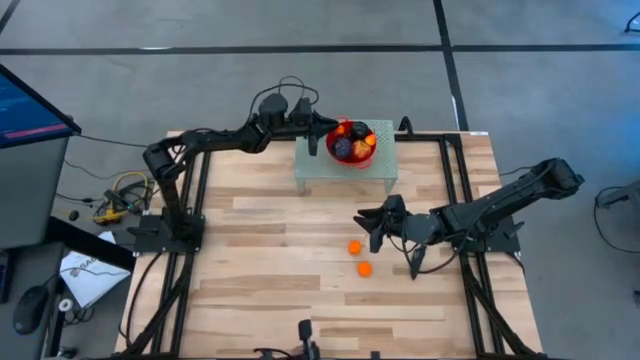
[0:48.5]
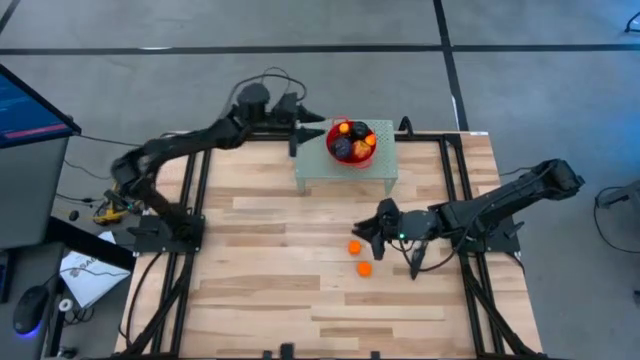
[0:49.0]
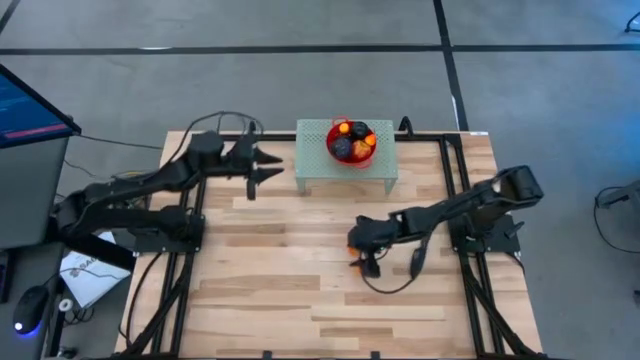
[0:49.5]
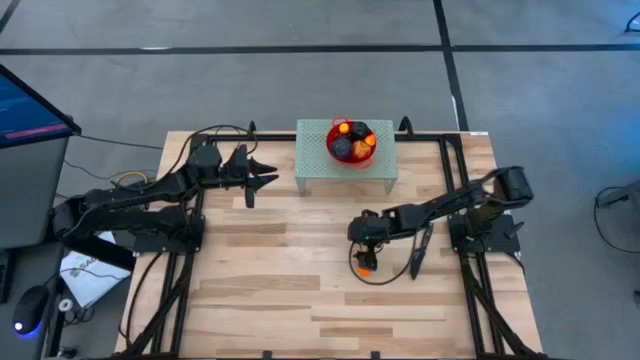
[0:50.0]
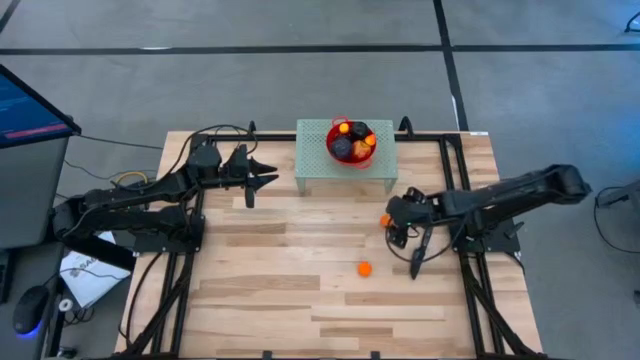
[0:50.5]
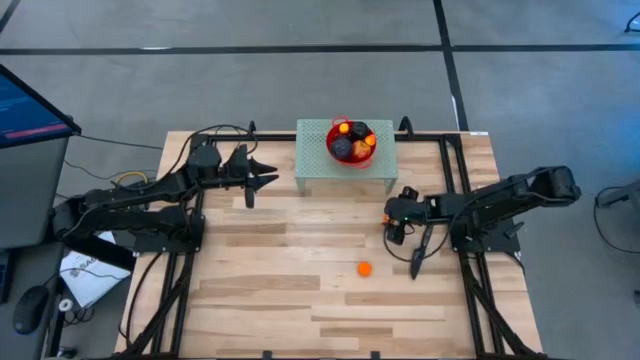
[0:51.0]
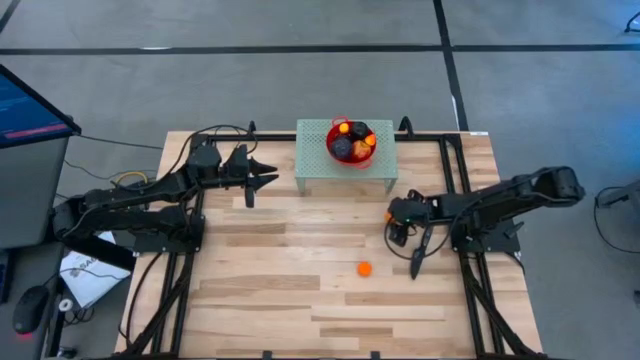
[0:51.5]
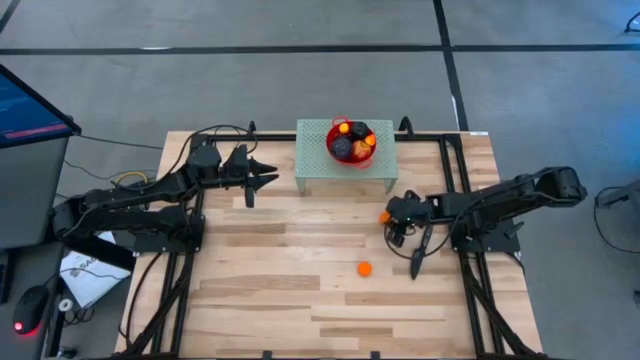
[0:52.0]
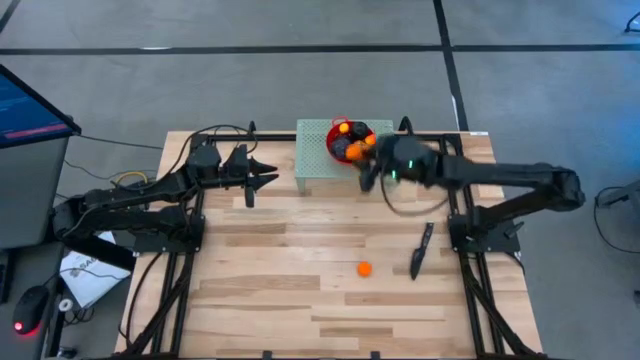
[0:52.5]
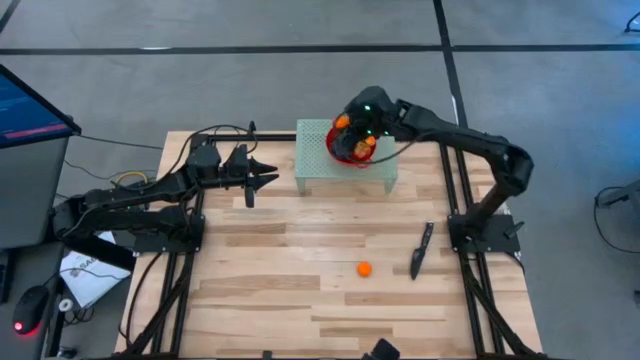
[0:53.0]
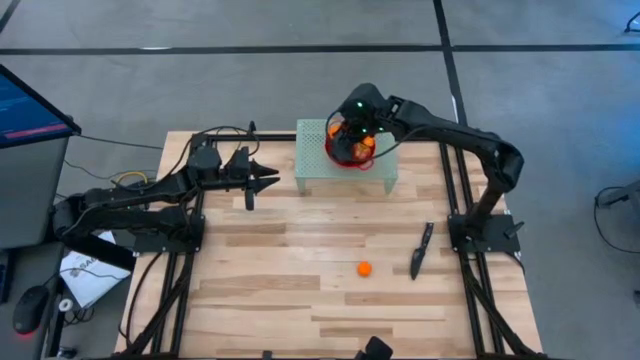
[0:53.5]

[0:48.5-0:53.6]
Task: Pick & Place Fruit
Put the top orange into the red strainer bowl on the shelf

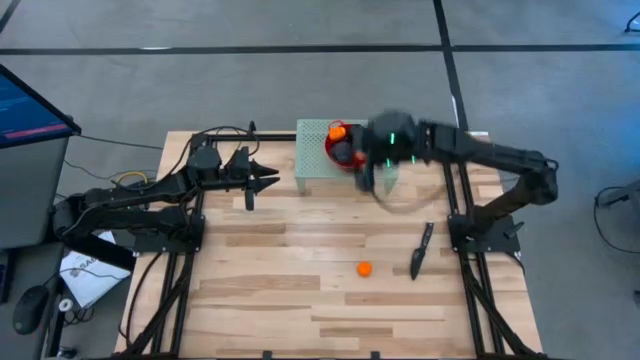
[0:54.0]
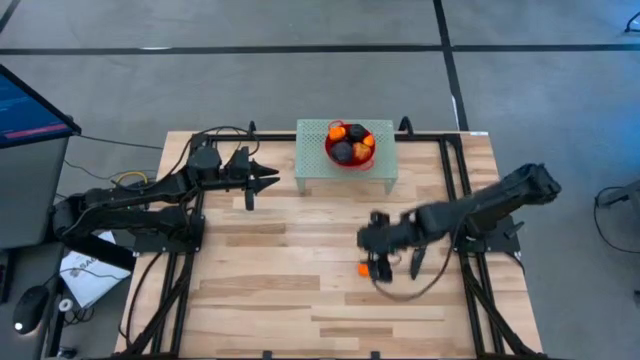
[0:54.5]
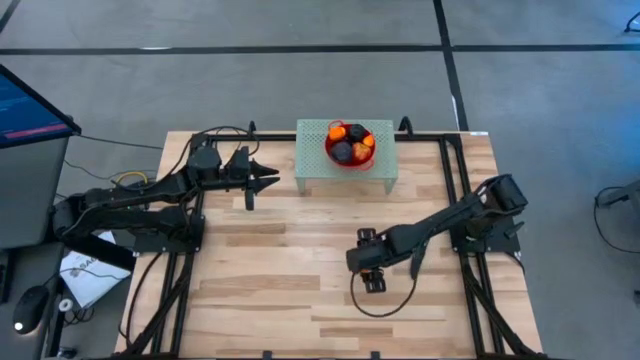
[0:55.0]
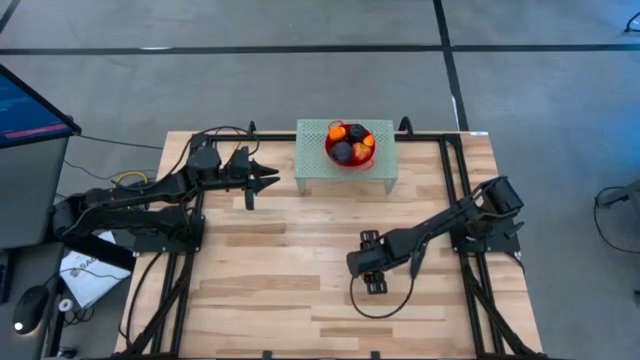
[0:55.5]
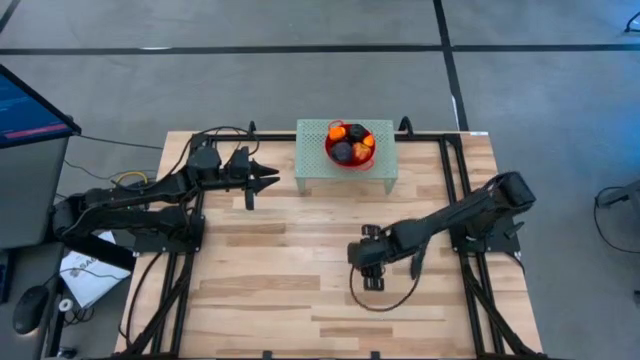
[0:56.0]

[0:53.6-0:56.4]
Put the orange into the red strainer bowl on the shelf

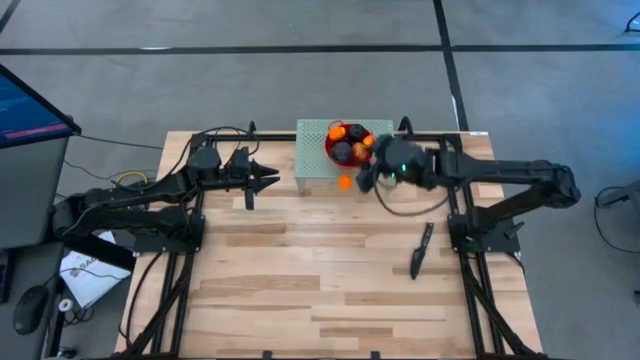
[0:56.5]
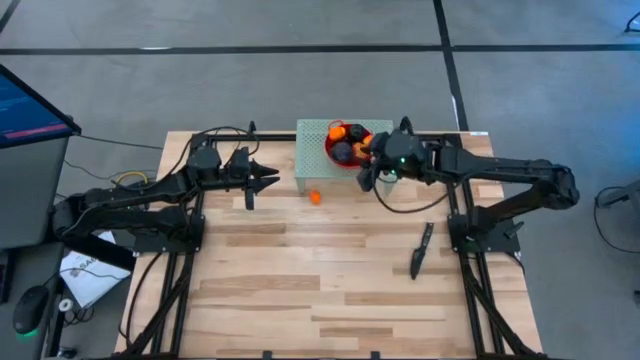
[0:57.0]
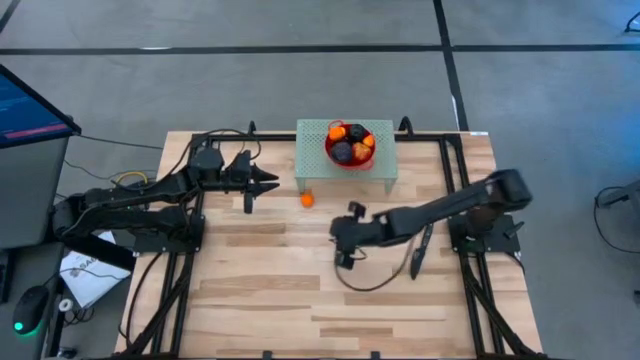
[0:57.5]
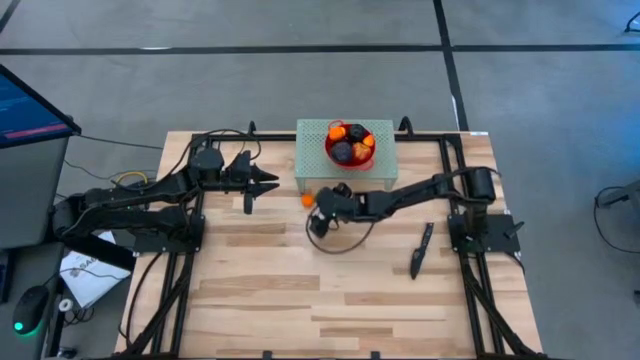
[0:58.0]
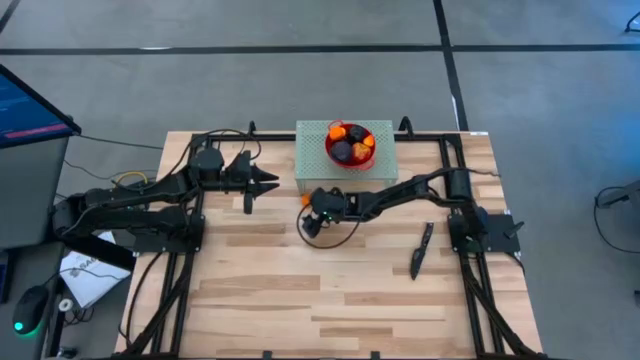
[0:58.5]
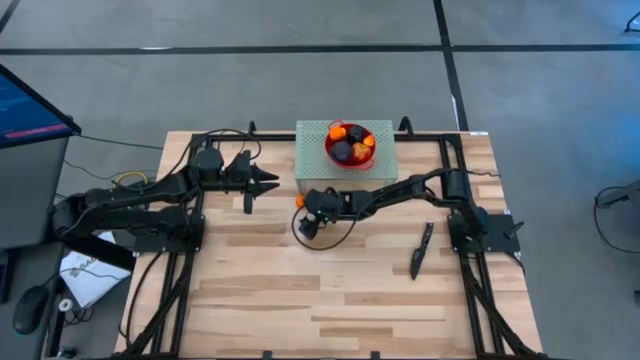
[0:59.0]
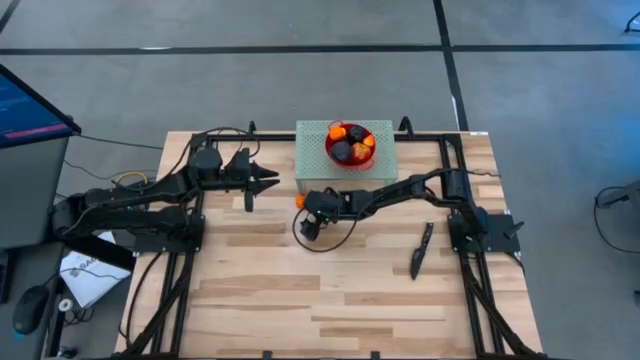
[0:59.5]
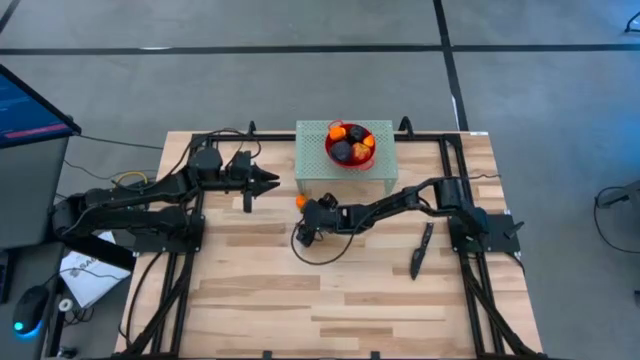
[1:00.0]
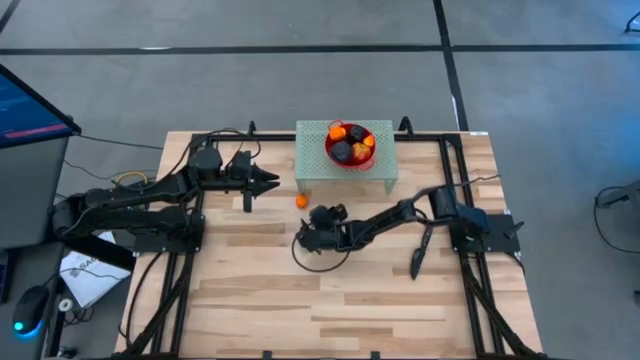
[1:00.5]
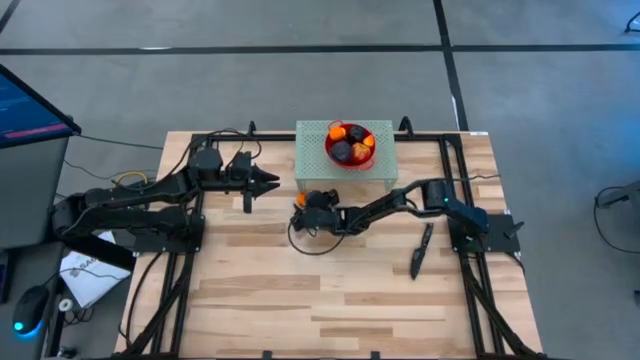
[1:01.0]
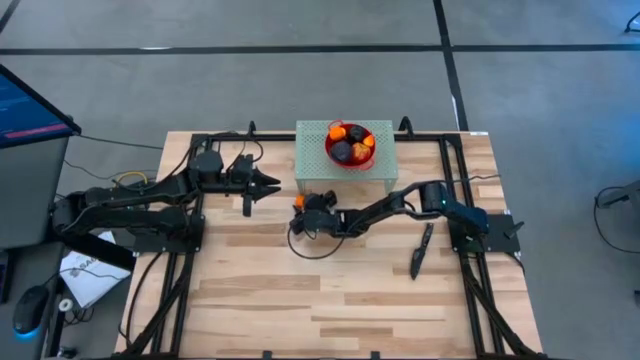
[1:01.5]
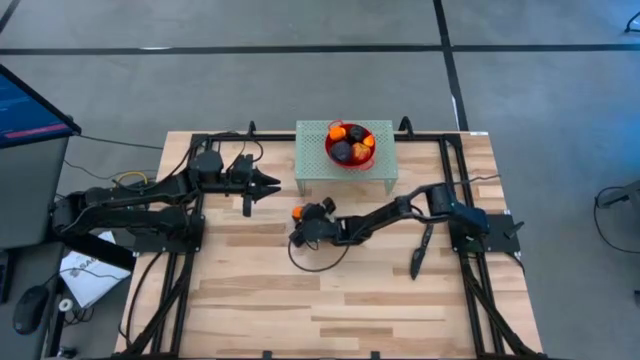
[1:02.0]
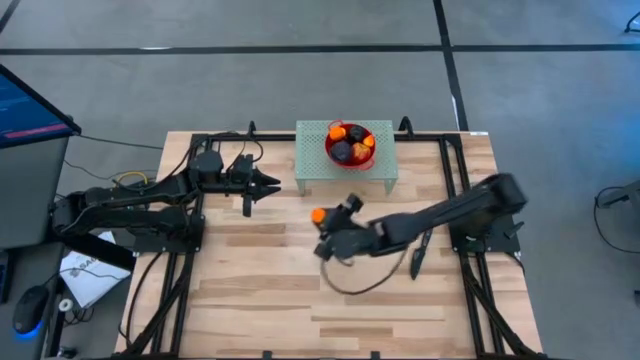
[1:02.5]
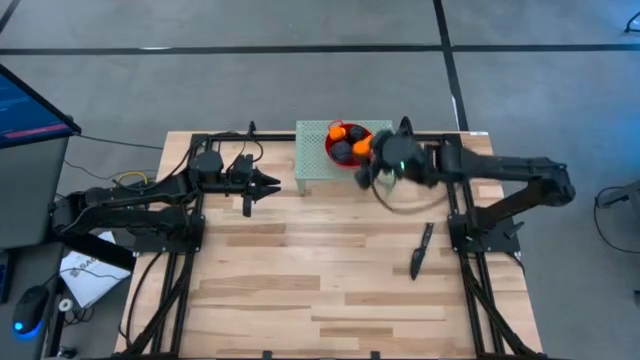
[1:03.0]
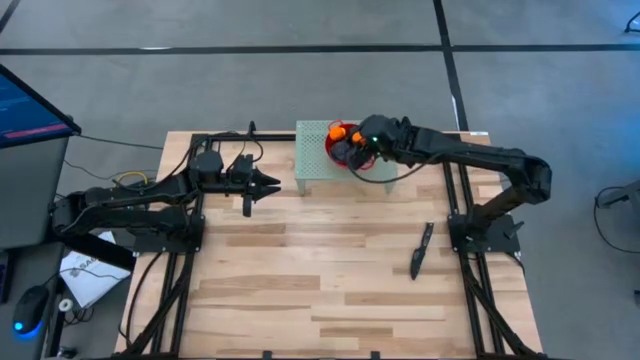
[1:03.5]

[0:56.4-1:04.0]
Put the orange into the red strainer bowl on the shelf

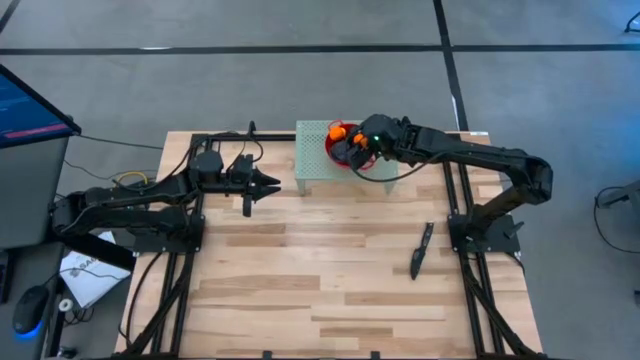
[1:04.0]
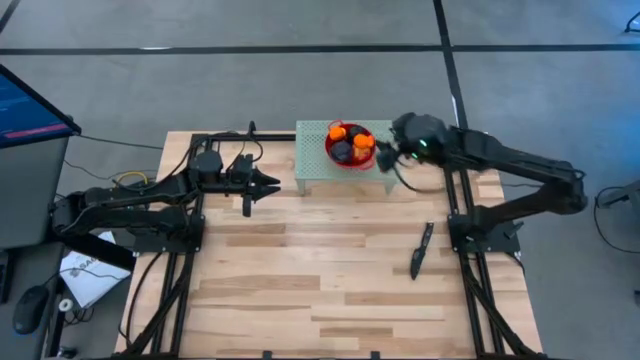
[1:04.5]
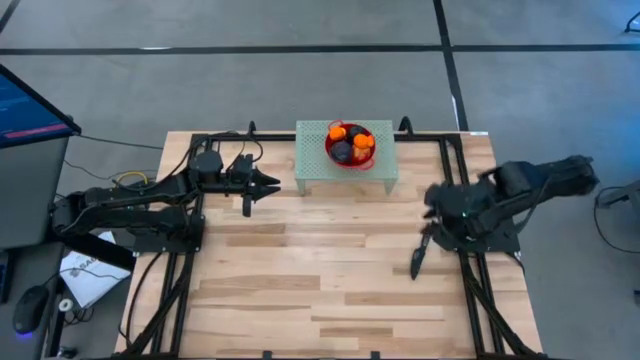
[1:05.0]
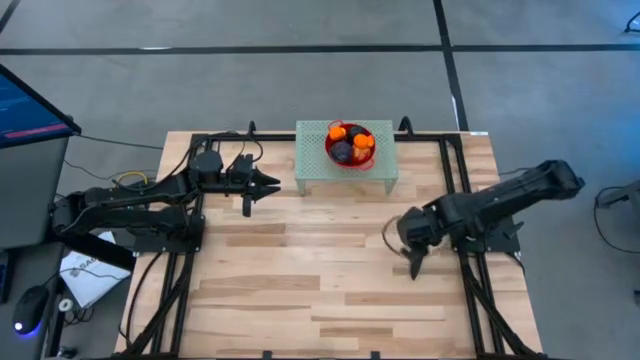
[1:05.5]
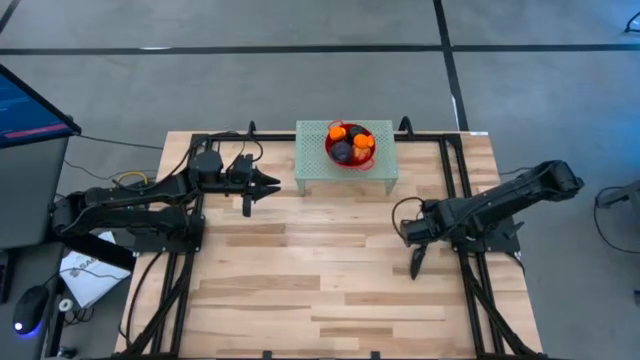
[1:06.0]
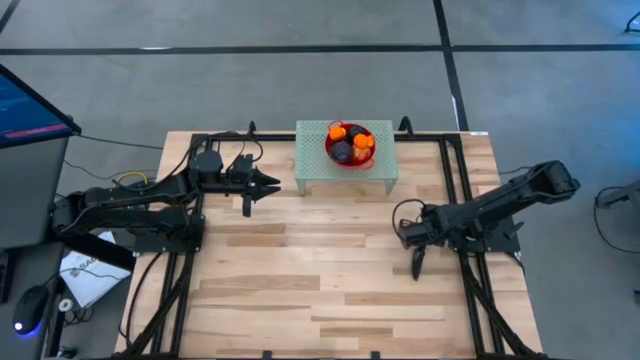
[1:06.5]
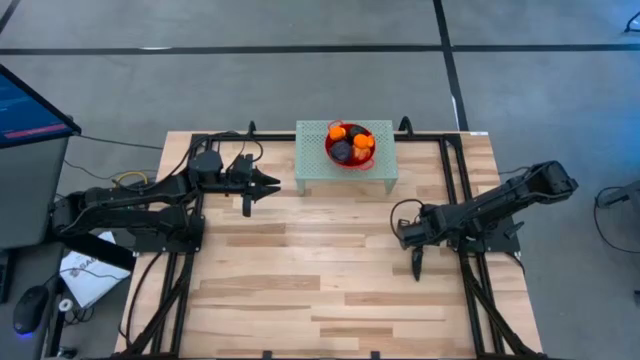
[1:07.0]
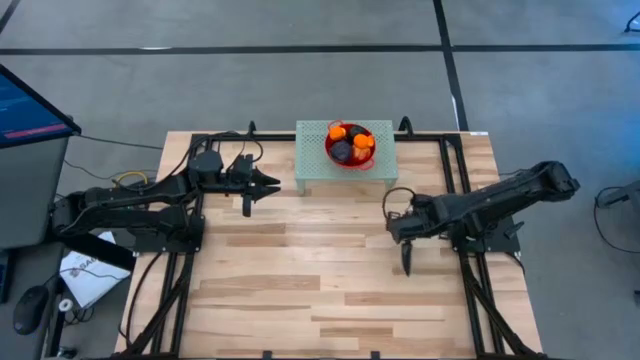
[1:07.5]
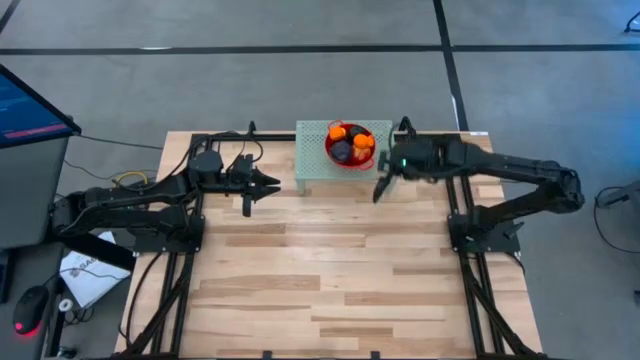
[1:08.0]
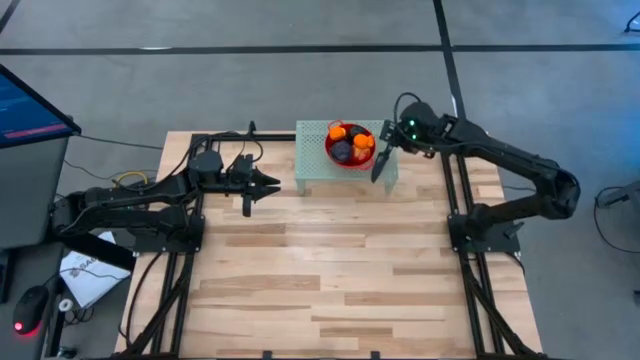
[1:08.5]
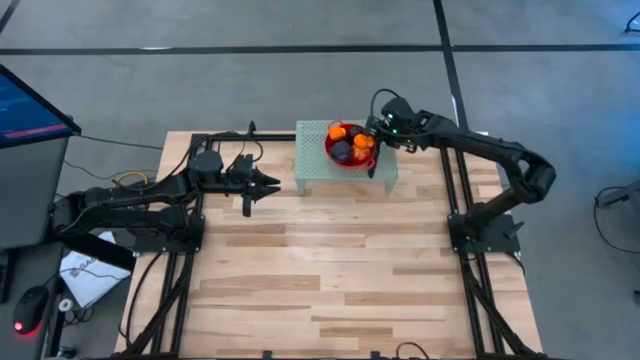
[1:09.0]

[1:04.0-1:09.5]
Put the black knife on the shelf
